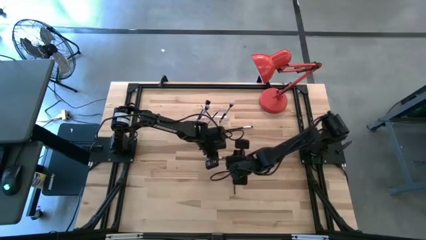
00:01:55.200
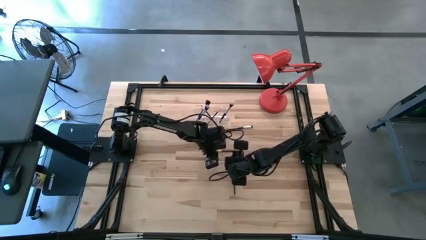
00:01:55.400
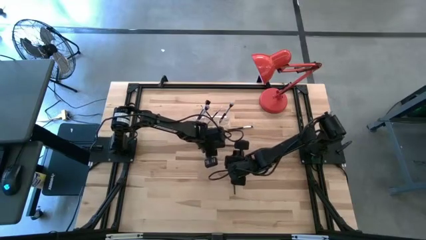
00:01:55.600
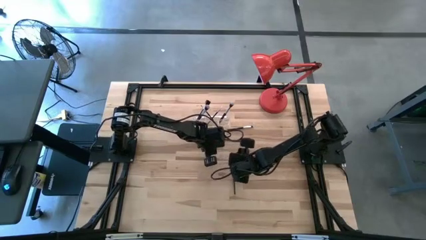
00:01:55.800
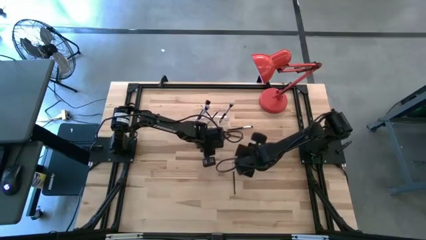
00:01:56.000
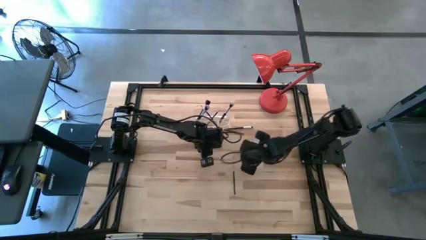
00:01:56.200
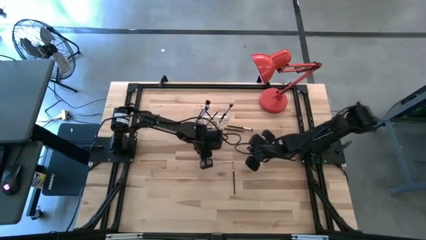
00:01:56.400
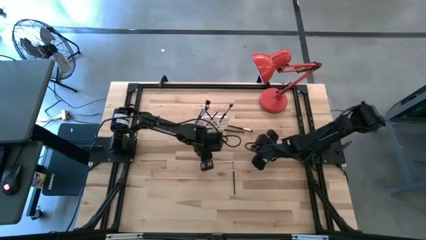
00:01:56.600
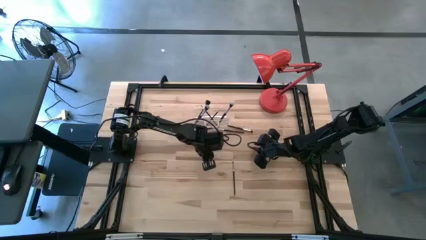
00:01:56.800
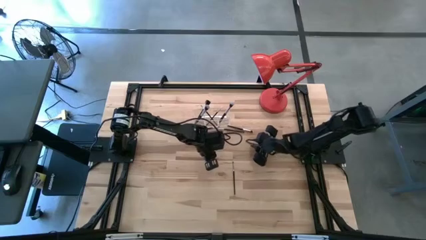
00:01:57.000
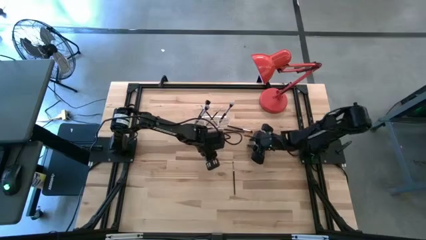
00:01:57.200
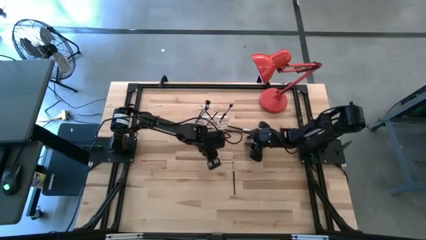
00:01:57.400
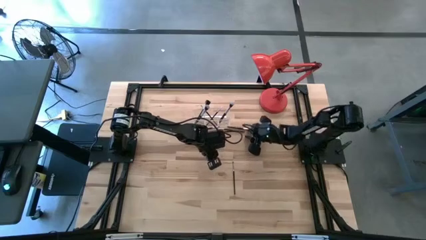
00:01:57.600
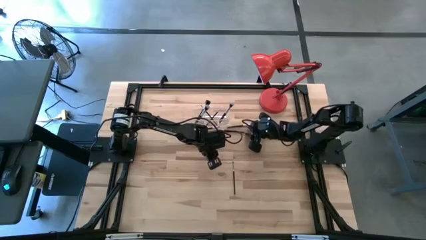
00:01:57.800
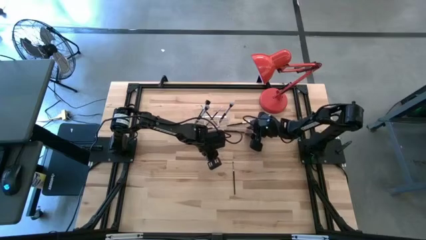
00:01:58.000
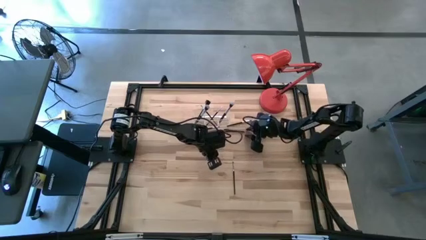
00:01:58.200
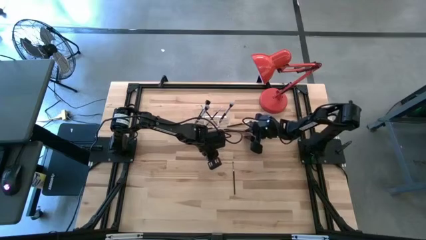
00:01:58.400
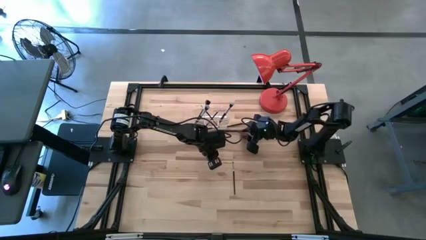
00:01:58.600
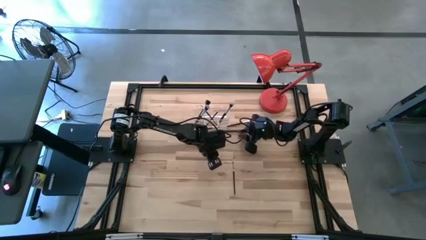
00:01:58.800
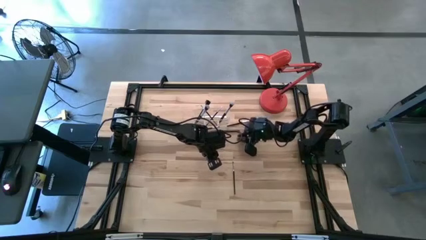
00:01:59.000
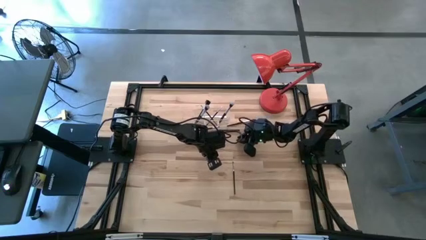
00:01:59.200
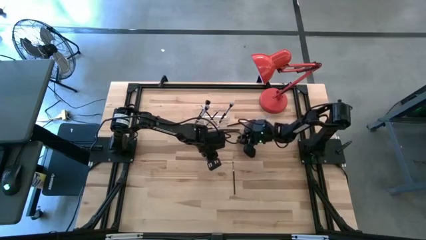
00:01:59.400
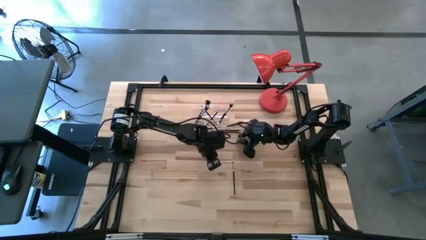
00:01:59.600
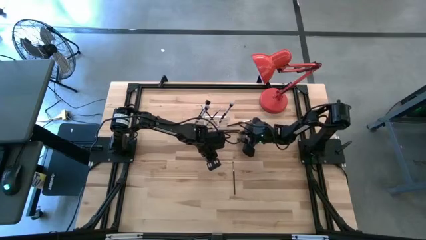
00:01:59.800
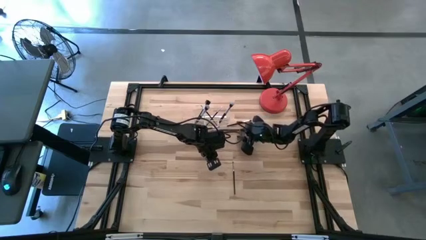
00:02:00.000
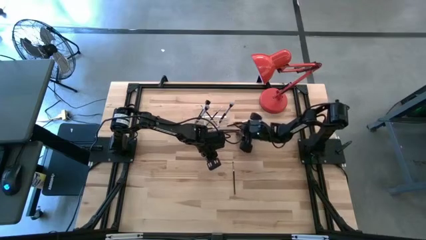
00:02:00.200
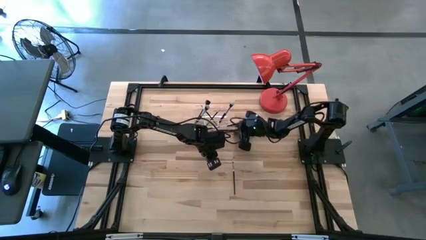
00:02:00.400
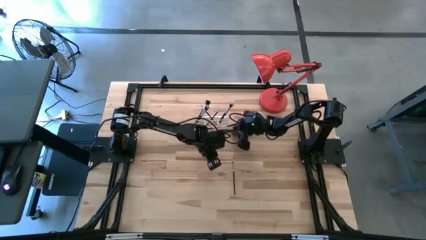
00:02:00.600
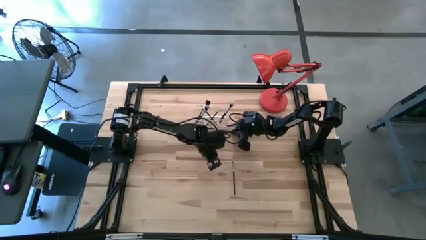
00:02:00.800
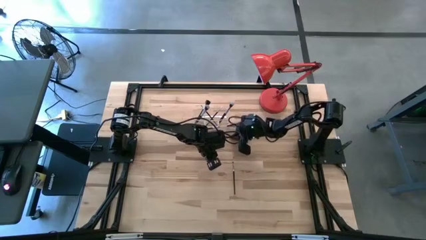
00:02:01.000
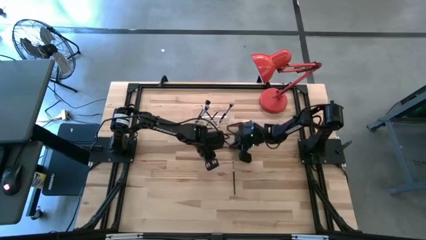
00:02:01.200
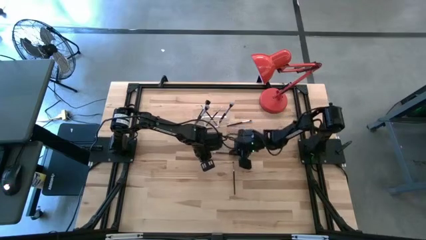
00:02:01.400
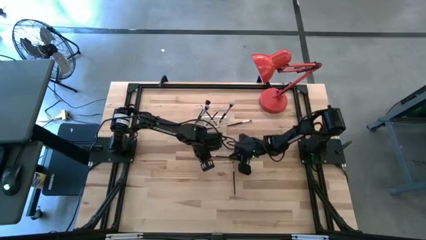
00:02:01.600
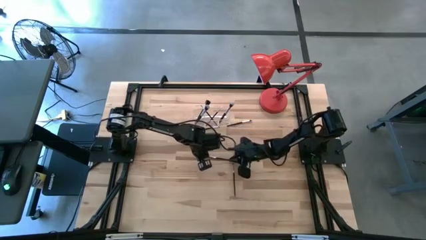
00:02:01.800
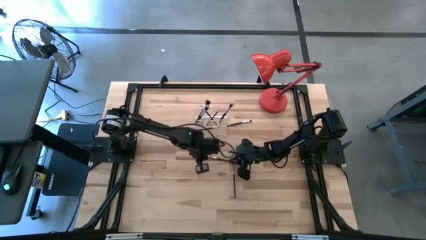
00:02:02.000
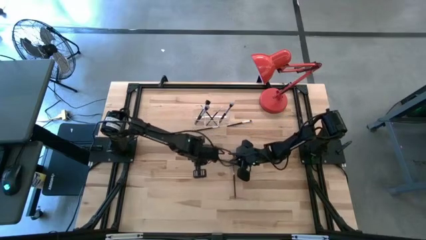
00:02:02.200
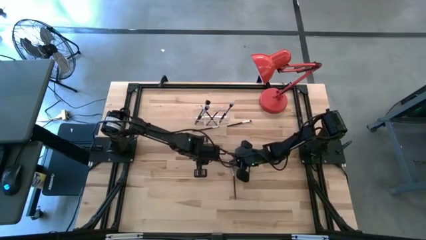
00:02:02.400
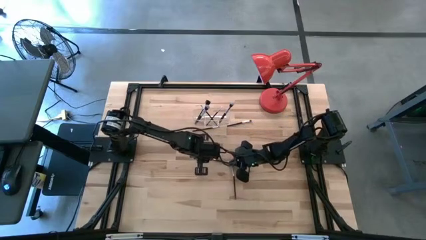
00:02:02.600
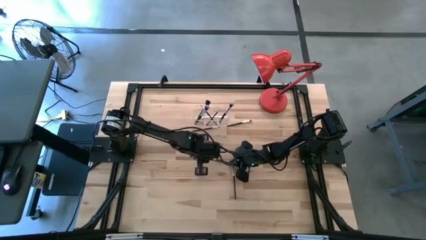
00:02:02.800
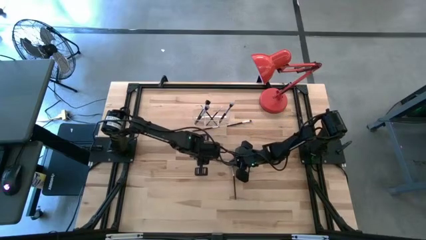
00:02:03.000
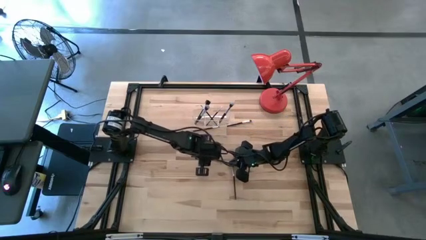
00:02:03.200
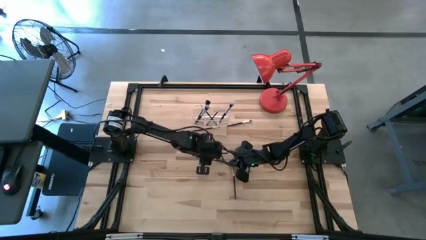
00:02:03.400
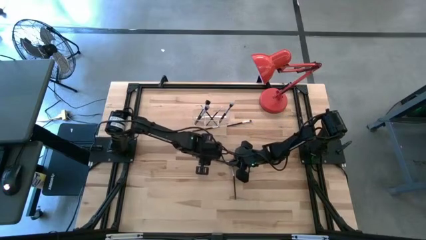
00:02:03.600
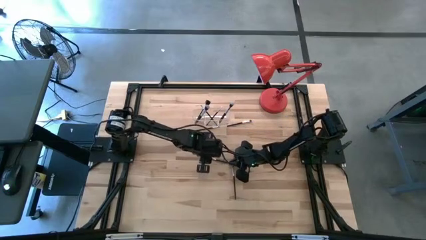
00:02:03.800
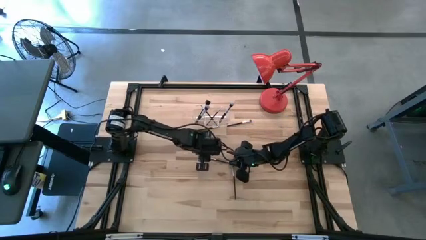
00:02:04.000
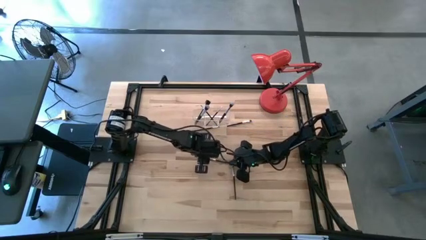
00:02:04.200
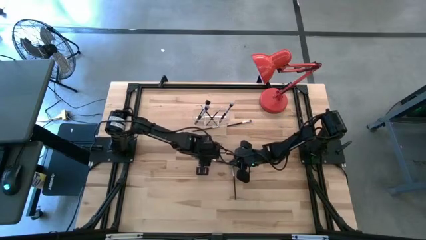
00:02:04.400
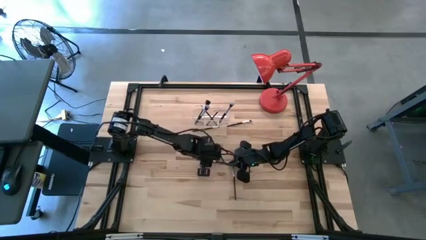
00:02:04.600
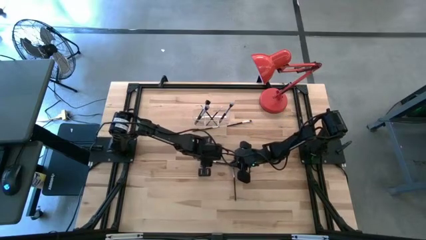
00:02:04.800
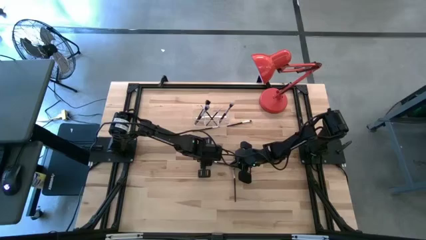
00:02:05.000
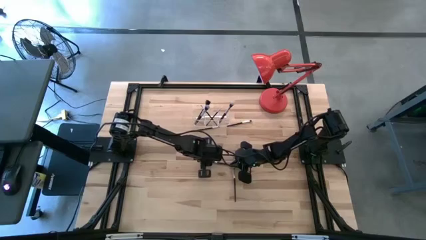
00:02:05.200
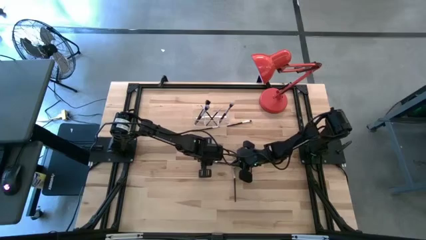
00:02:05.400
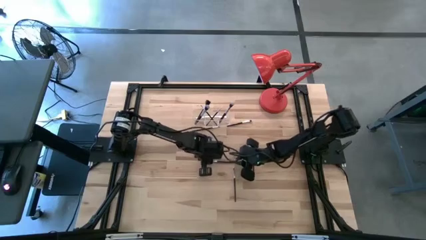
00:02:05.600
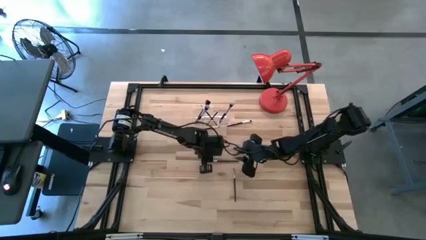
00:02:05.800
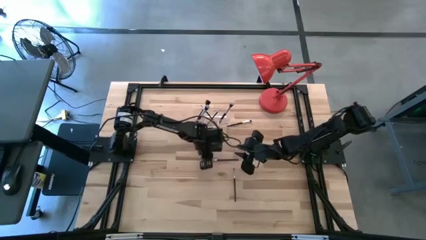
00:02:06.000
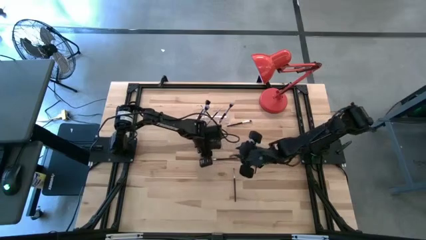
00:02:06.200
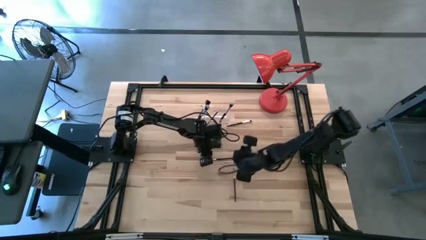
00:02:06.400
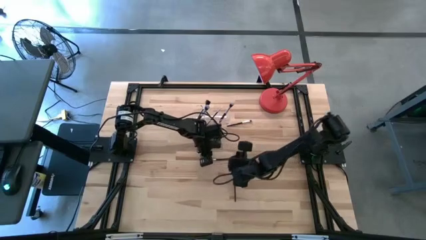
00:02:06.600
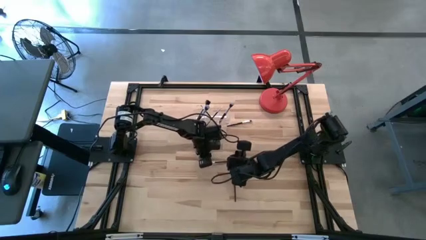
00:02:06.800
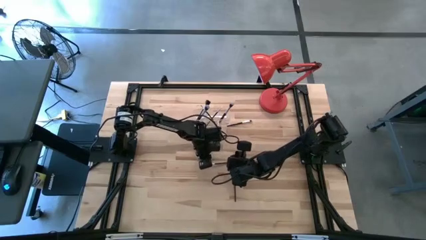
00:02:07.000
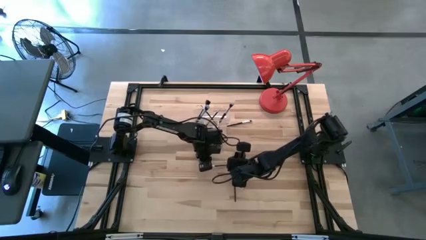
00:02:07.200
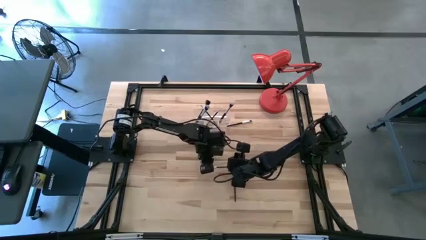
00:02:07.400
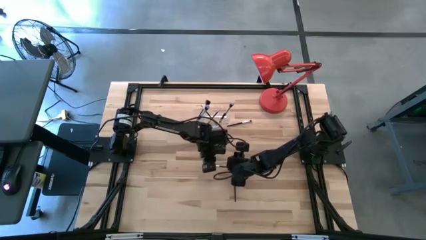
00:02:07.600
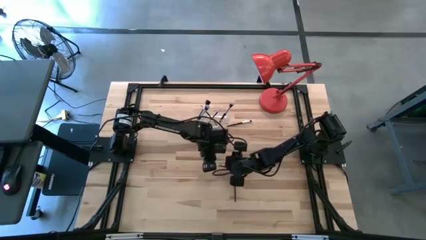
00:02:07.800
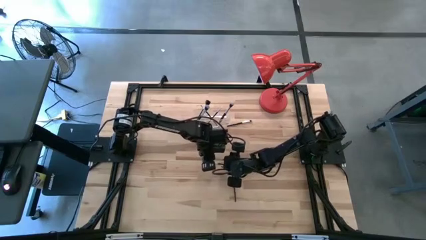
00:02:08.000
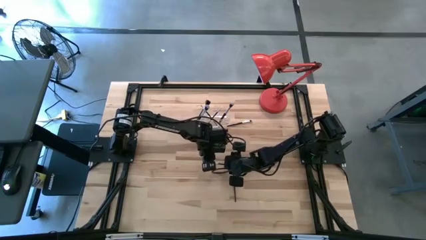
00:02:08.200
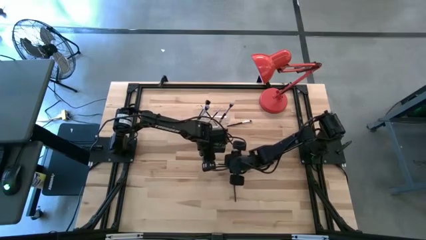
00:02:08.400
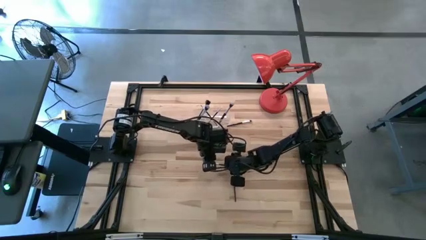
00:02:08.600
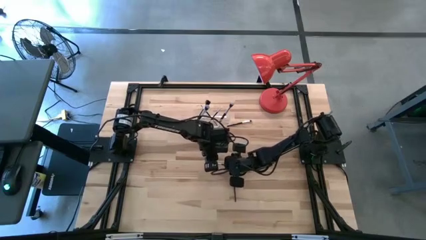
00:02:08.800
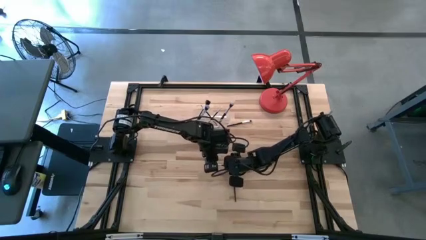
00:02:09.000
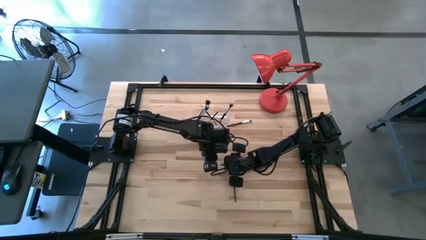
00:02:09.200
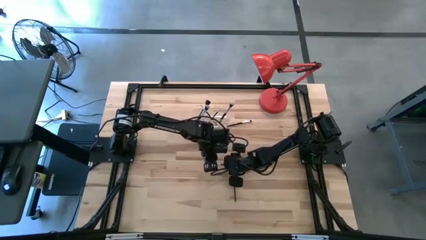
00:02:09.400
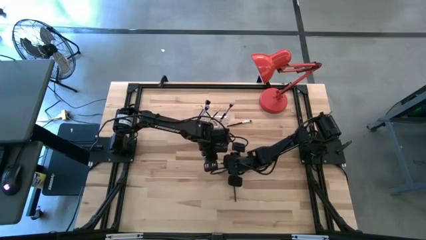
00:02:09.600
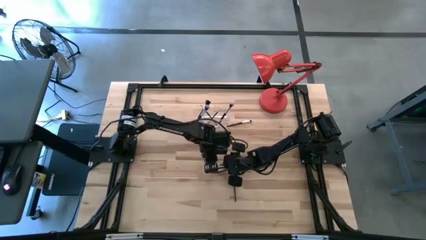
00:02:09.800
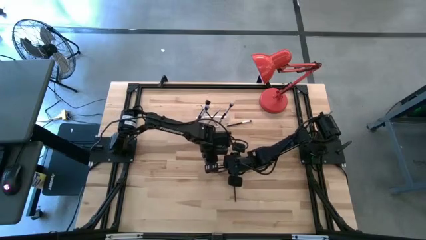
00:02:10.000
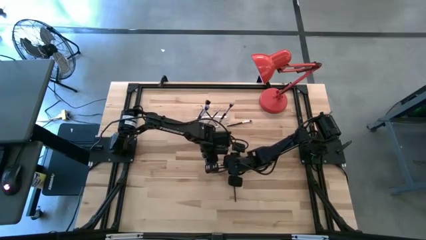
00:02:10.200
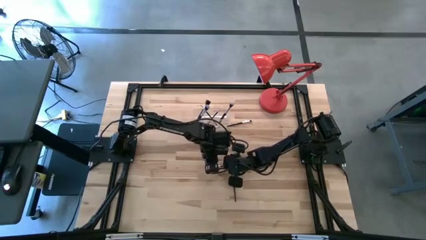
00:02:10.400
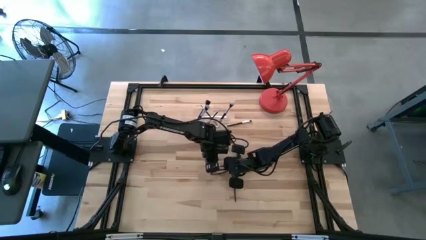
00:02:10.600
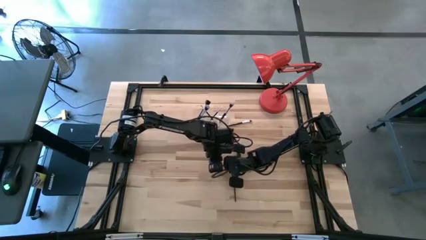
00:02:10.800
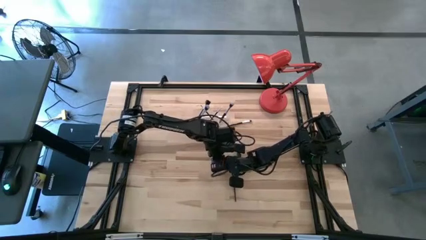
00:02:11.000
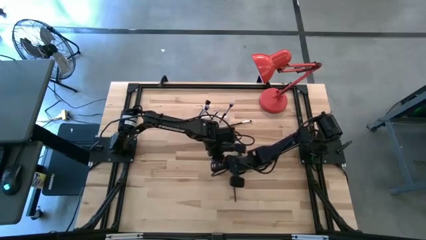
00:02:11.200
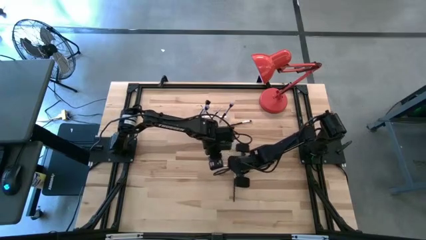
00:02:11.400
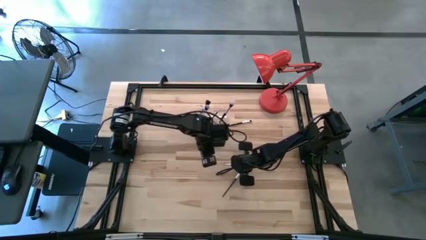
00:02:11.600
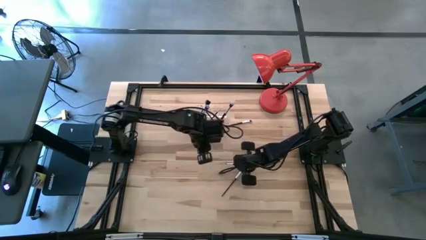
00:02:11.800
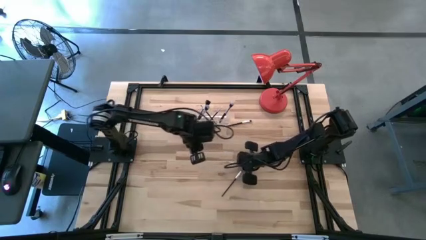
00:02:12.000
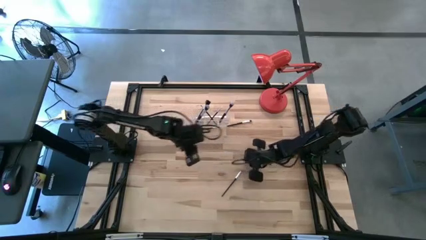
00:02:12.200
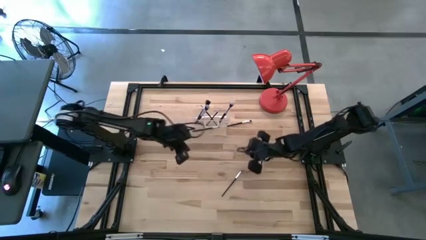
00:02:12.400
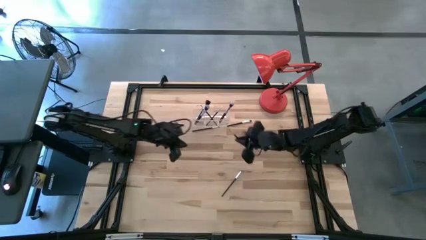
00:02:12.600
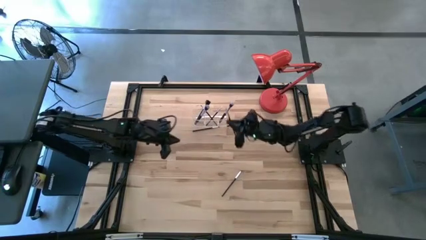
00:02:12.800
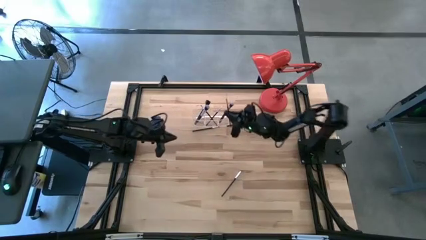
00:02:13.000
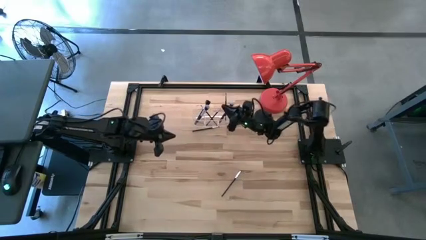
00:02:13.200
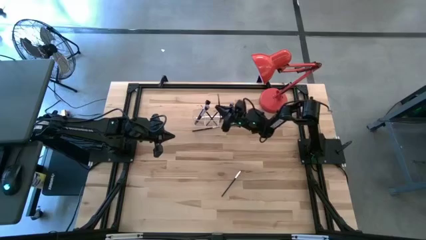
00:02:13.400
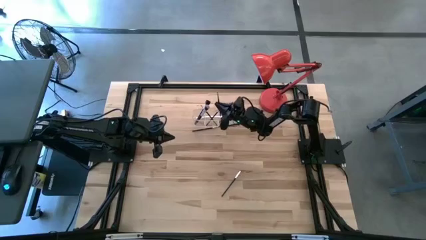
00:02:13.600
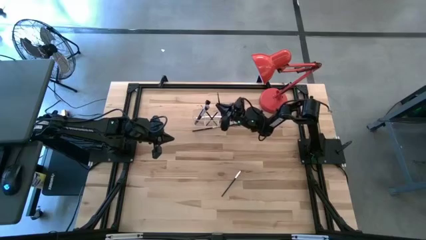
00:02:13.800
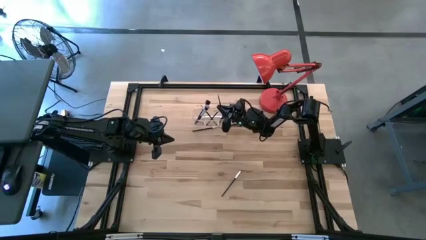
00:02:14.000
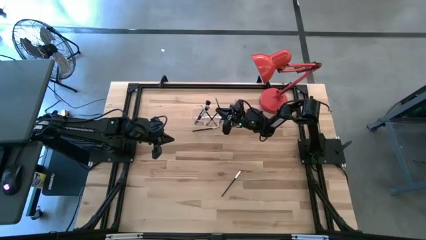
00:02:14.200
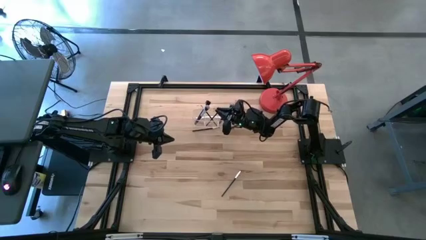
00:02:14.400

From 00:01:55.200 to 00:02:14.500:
Task: Put items in baskets/containers
Put the black eyeshadow brush into the transparent organizer
